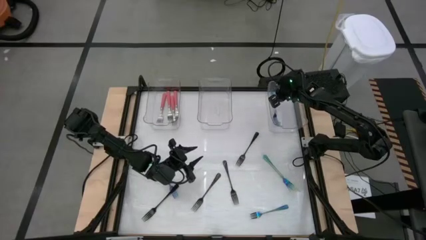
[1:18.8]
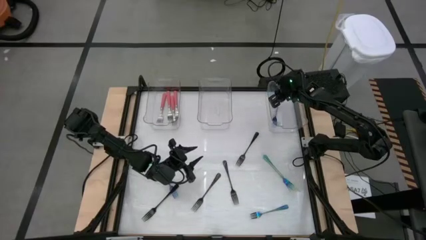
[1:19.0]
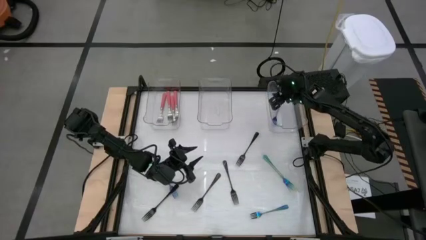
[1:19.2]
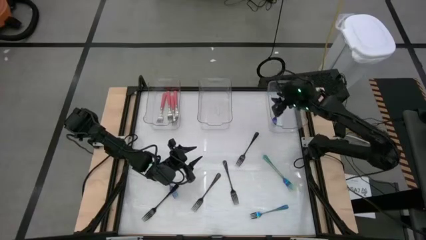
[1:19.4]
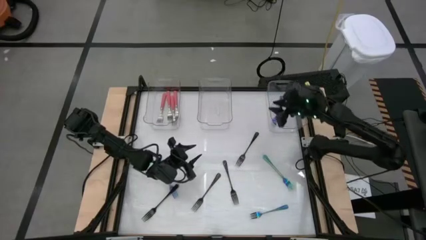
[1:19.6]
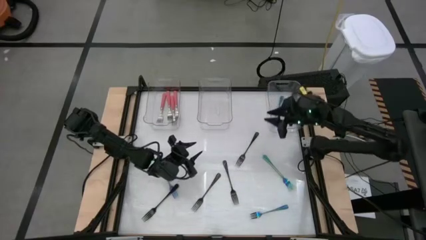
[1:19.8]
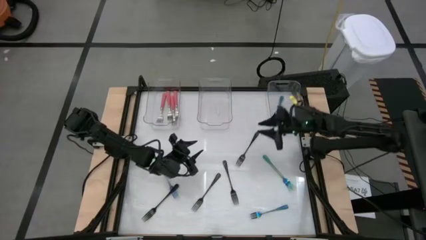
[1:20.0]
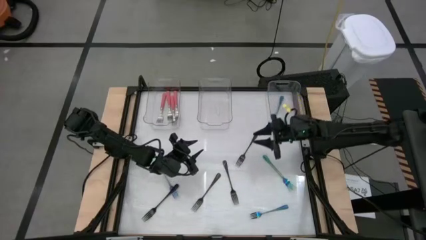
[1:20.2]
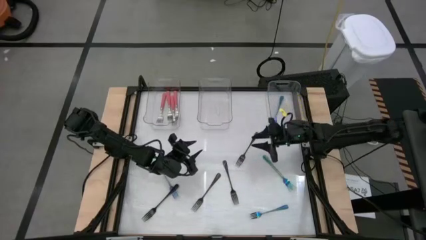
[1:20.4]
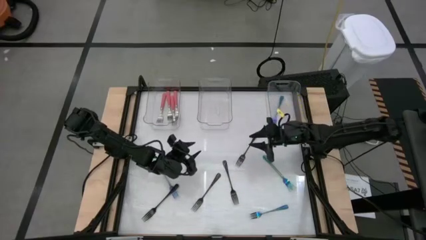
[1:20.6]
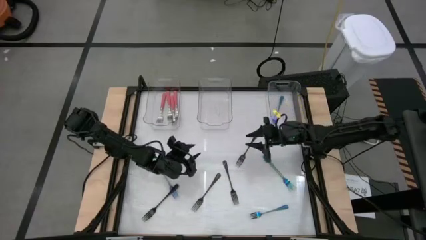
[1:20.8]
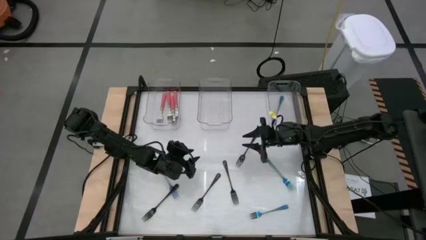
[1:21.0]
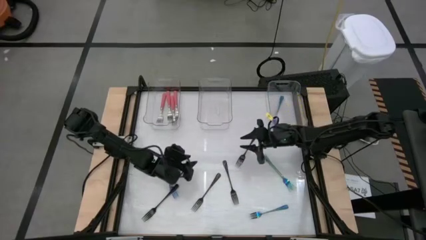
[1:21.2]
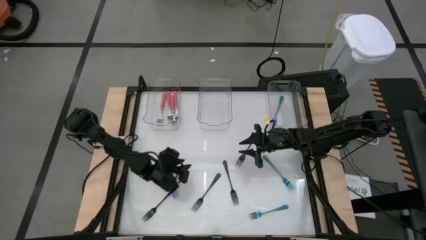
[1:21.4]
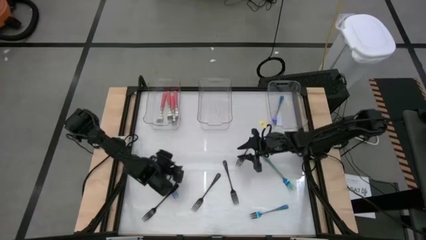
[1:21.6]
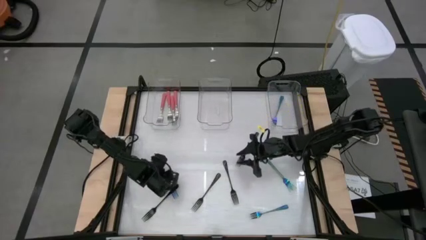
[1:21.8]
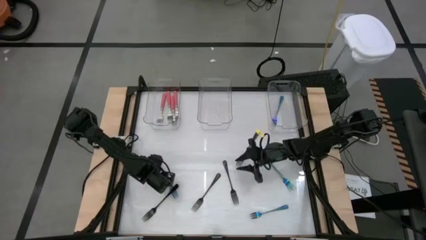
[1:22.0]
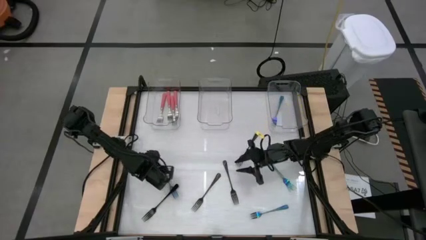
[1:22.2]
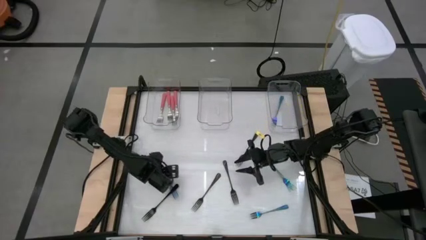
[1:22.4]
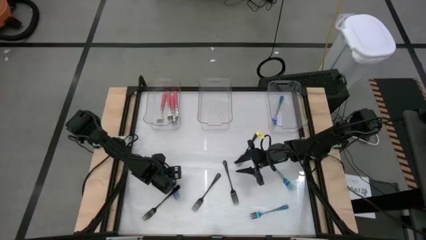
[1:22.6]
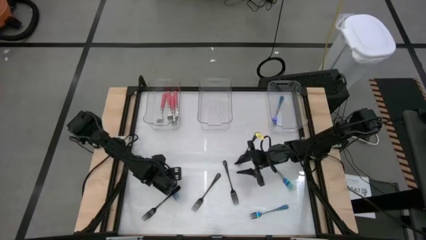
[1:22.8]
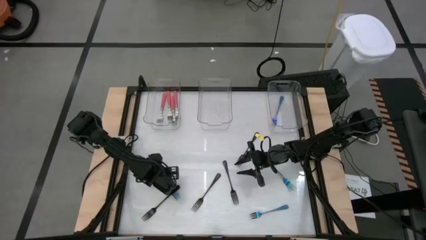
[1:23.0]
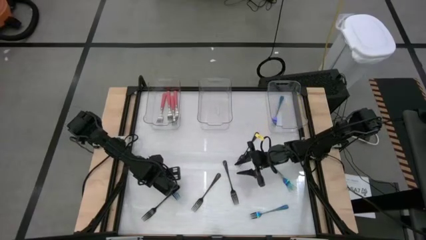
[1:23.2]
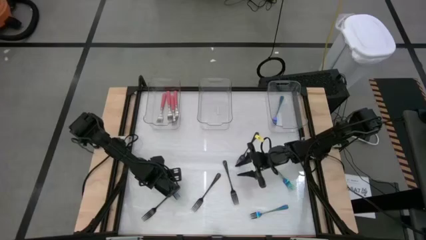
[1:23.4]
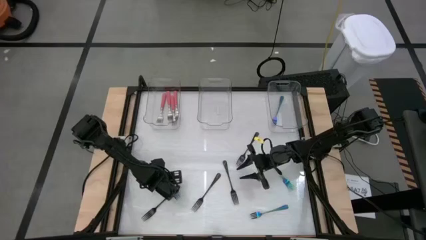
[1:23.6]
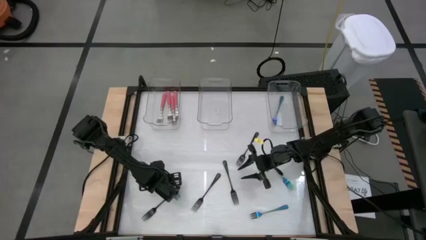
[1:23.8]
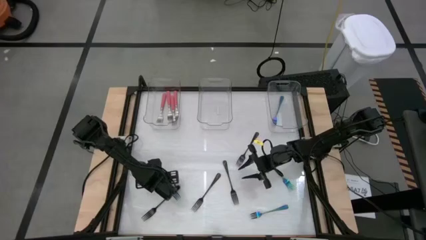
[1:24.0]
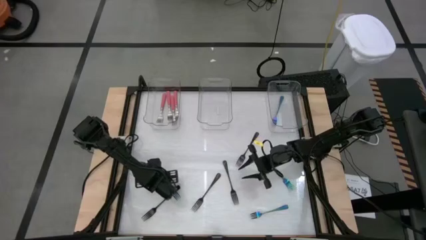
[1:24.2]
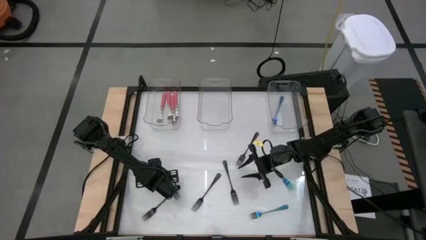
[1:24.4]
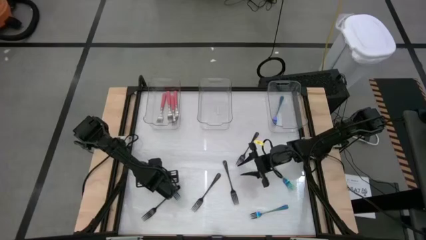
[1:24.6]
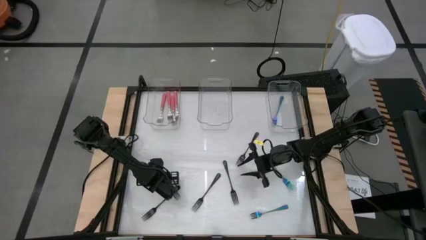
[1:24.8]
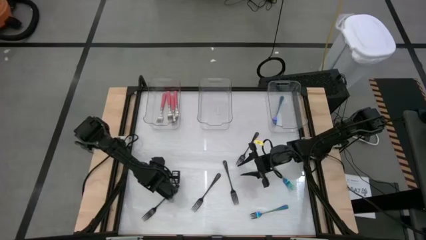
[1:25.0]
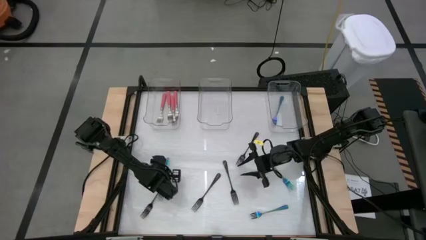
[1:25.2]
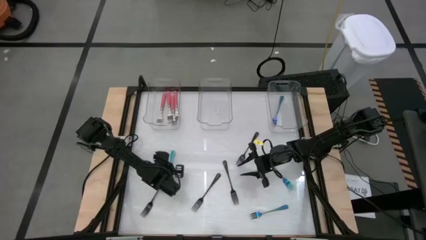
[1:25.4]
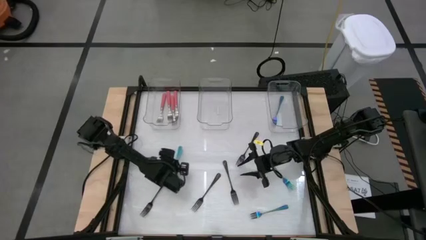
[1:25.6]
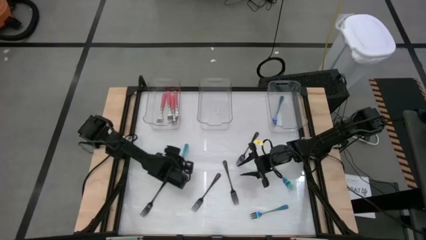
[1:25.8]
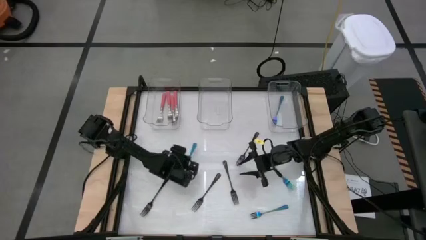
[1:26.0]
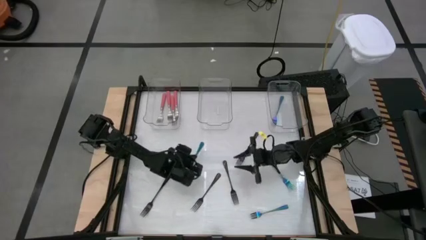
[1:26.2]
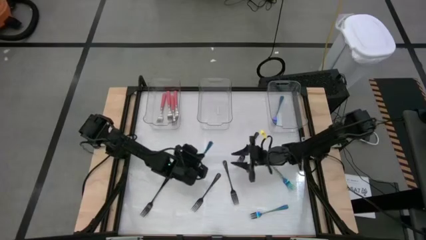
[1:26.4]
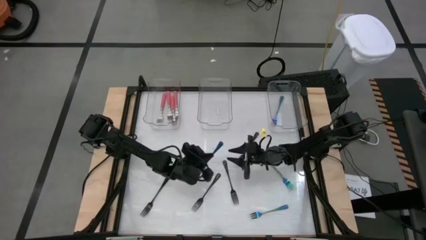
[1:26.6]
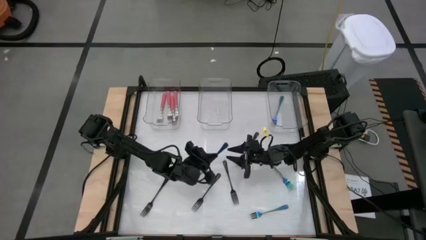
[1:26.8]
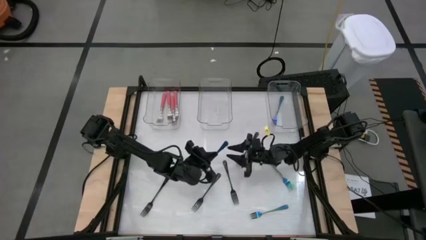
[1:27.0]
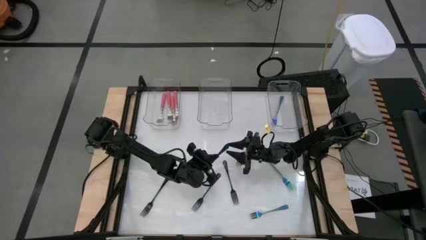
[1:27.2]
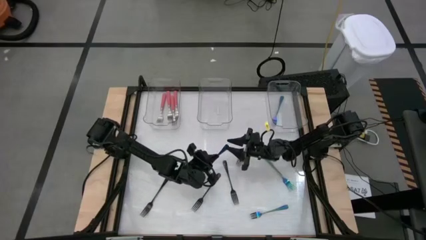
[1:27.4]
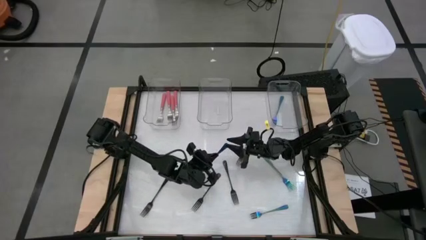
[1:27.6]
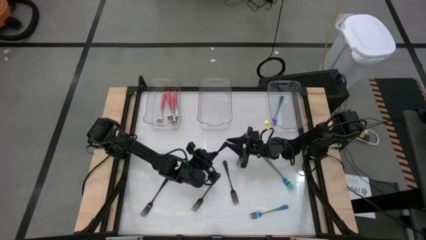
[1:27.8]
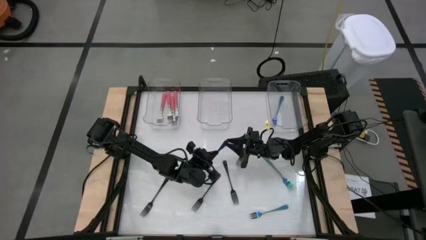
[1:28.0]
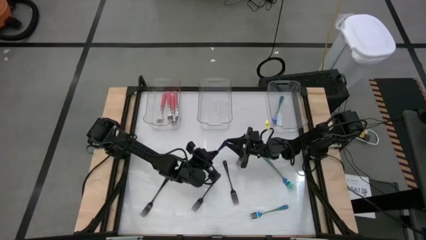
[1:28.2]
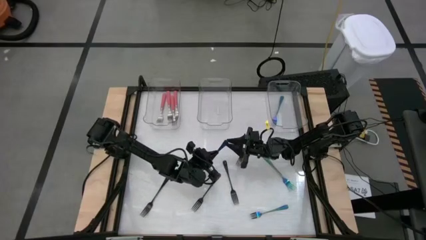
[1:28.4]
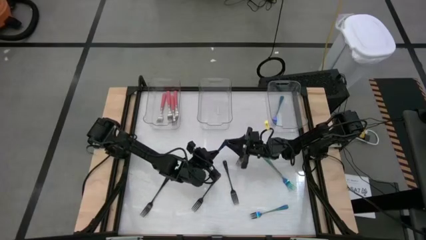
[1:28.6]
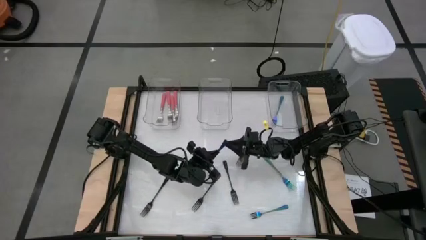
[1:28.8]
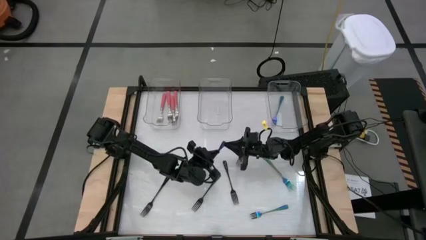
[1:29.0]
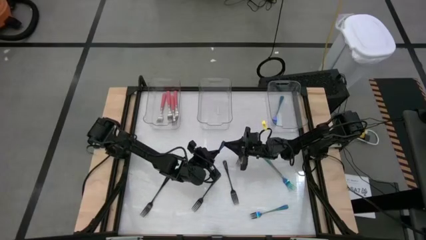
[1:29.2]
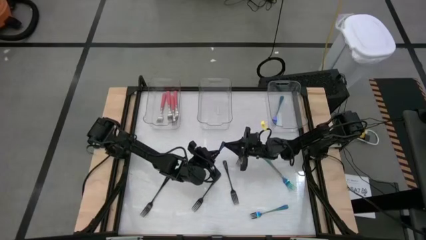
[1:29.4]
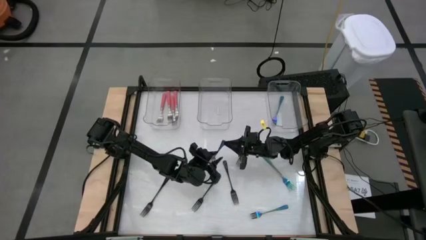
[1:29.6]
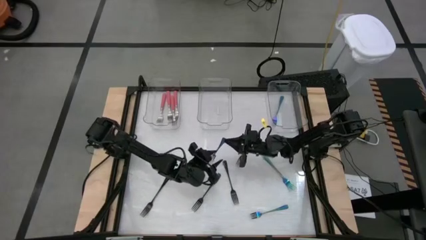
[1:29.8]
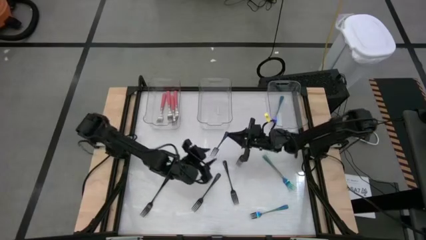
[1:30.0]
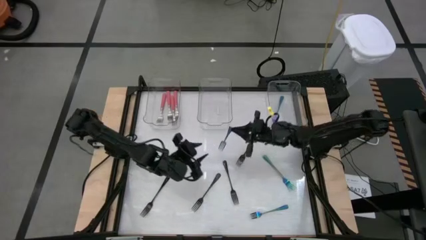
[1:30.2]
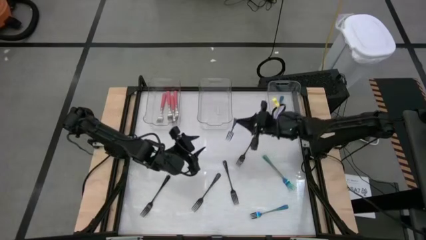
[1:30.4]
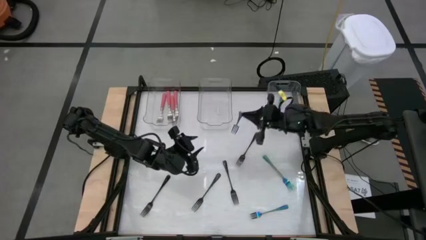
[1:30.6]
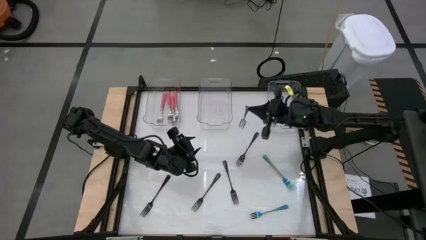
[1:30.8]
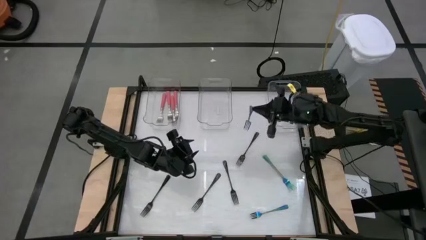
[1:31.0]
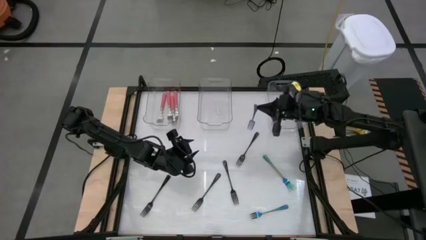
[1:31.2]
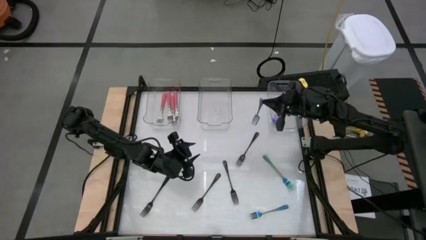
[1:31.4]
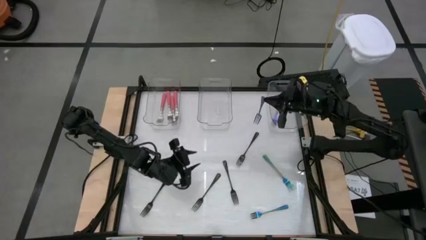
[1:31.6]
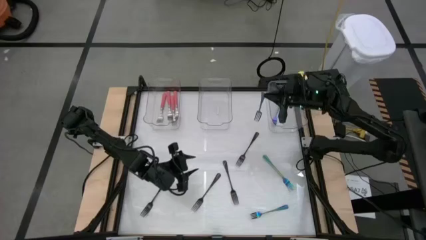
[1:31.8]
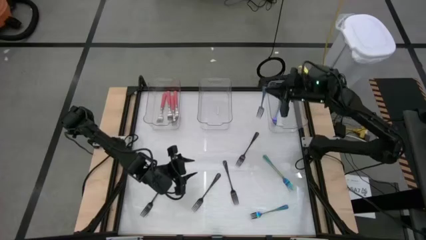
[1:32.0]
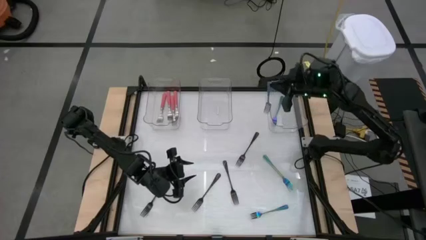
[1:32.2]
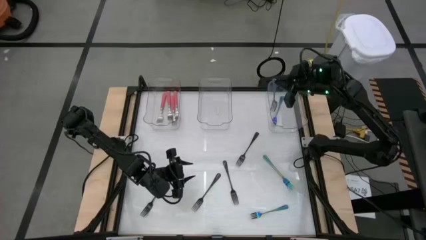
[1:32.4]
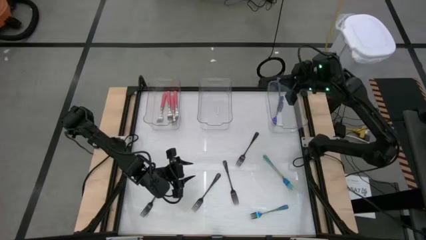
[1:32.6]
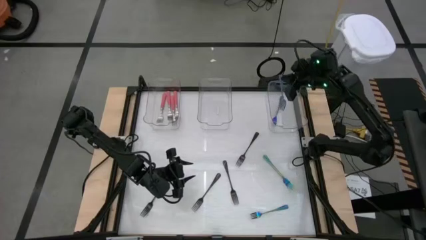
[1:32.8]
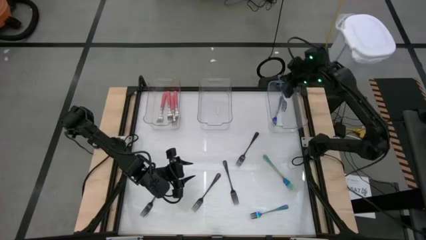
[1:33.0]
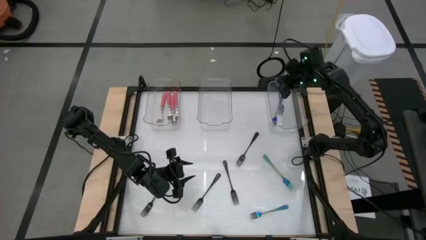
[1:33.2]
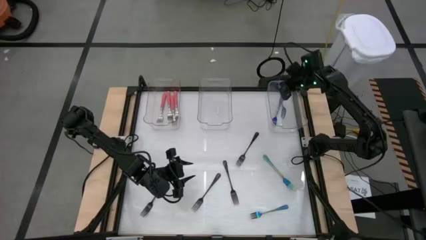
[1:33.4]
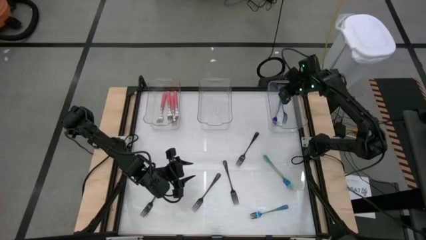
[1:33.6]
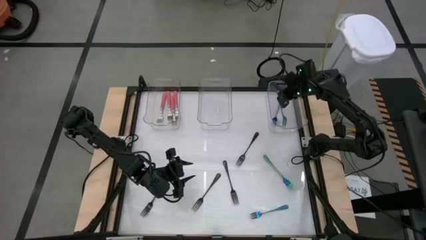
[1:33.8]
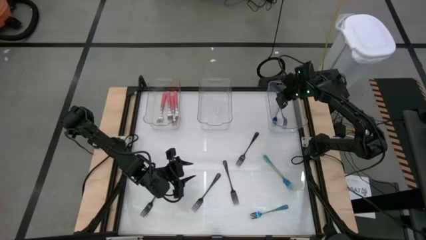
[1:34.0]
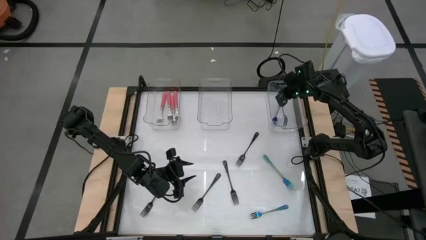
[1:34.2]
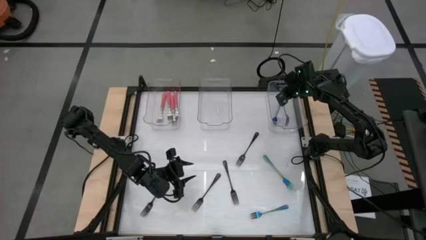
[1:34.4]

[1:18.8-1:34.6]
Task: Sort silverware by color (type)
Put the blue fork into the right transparent bin
